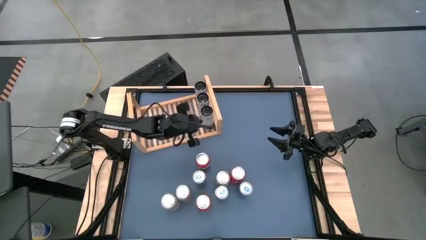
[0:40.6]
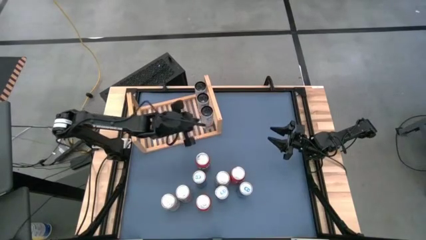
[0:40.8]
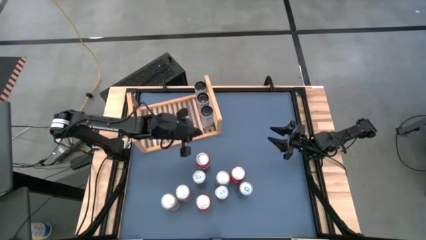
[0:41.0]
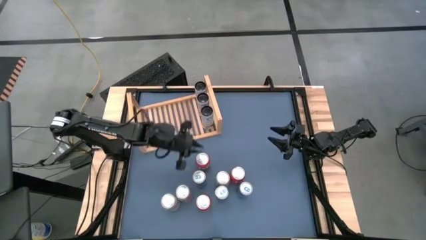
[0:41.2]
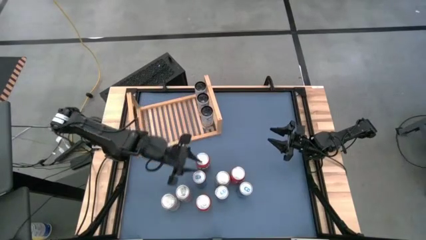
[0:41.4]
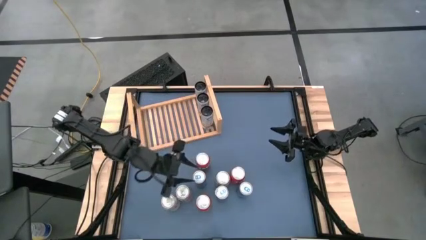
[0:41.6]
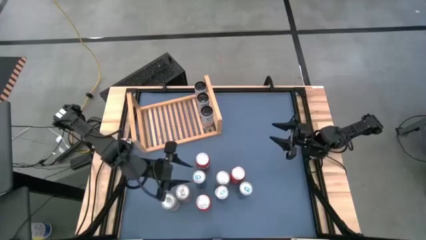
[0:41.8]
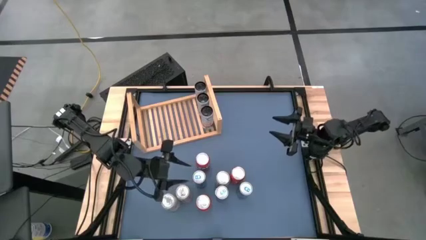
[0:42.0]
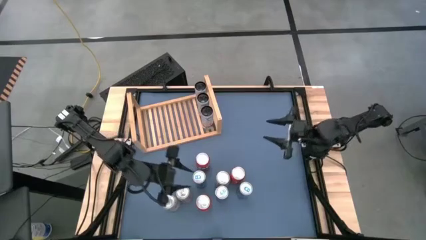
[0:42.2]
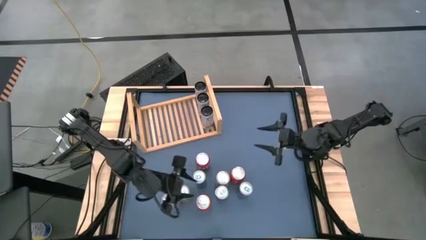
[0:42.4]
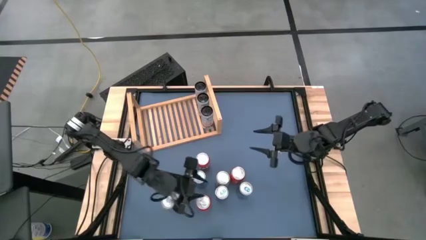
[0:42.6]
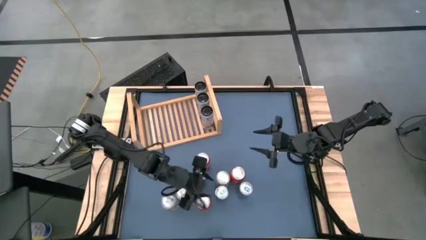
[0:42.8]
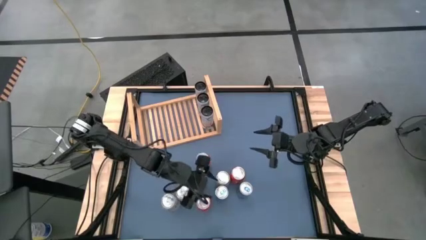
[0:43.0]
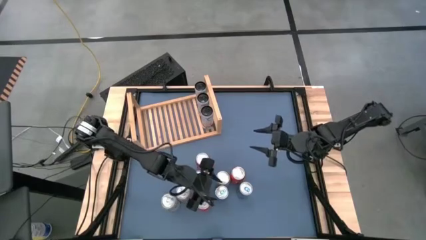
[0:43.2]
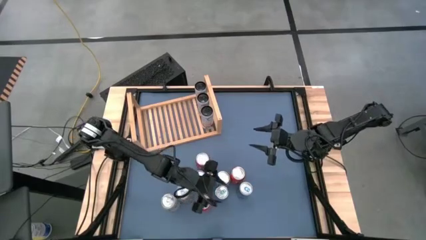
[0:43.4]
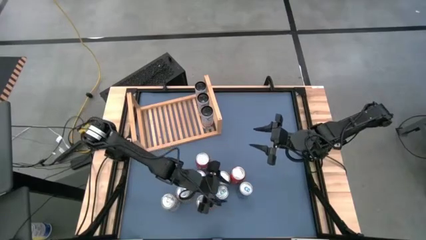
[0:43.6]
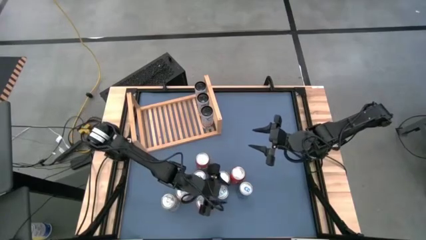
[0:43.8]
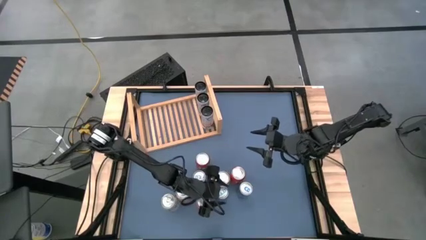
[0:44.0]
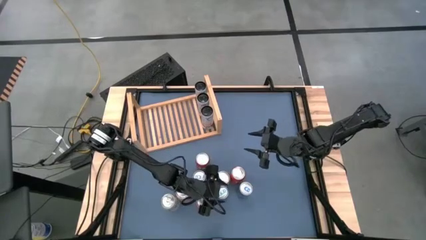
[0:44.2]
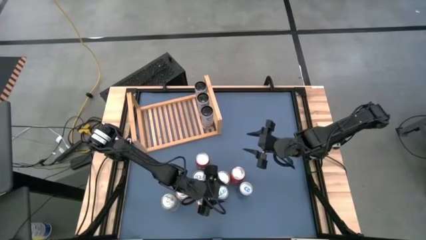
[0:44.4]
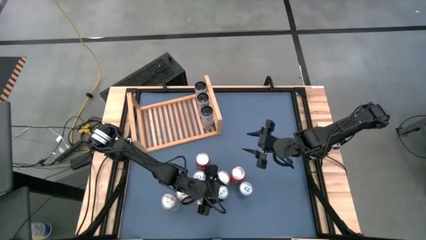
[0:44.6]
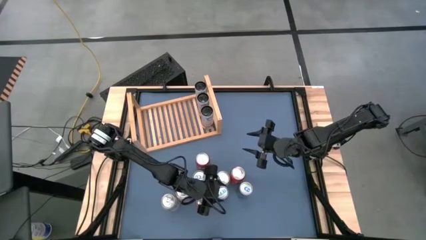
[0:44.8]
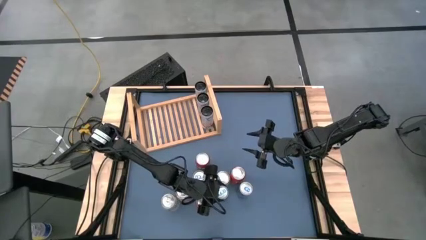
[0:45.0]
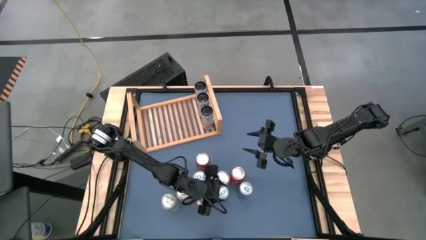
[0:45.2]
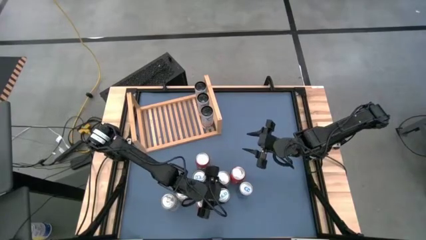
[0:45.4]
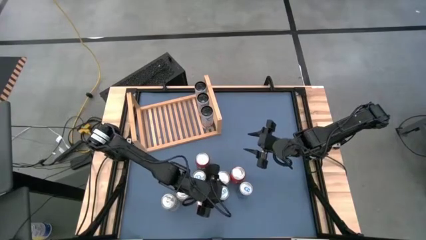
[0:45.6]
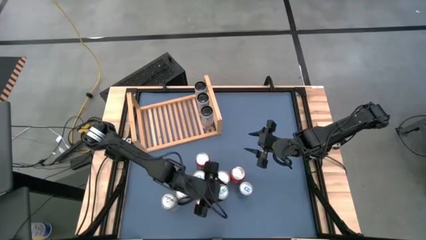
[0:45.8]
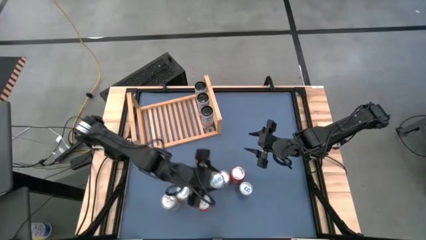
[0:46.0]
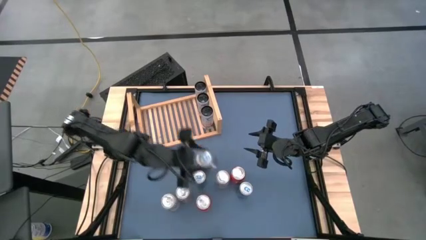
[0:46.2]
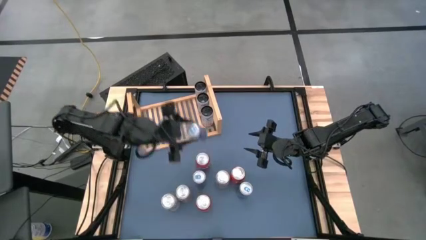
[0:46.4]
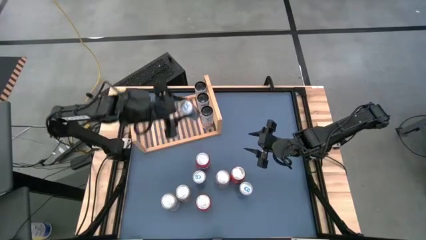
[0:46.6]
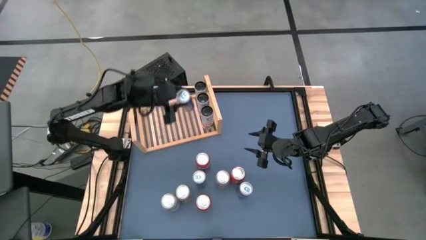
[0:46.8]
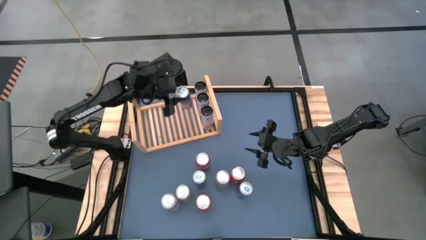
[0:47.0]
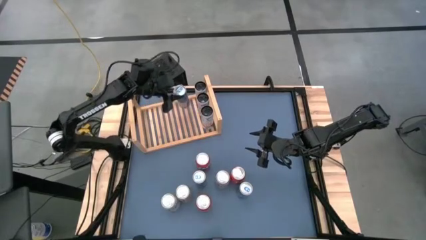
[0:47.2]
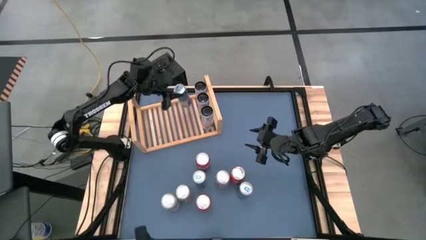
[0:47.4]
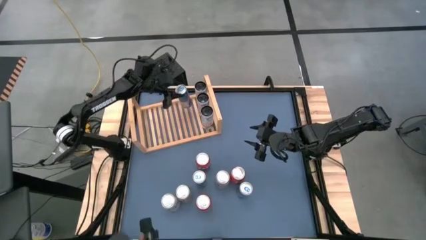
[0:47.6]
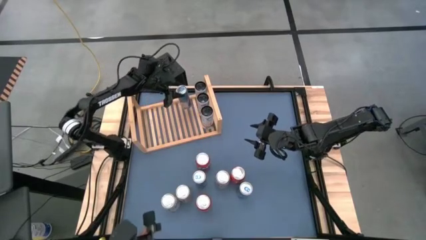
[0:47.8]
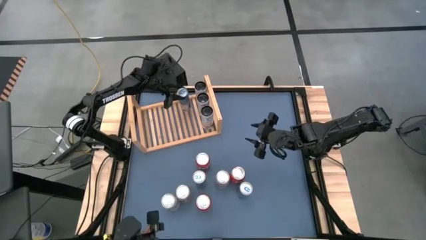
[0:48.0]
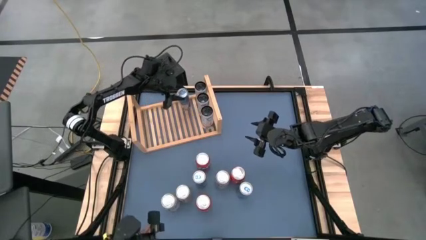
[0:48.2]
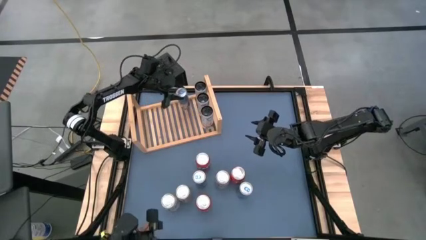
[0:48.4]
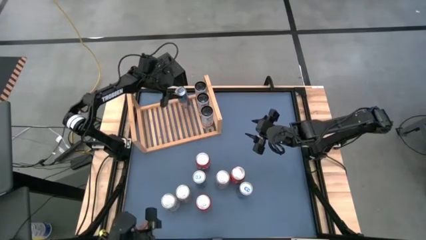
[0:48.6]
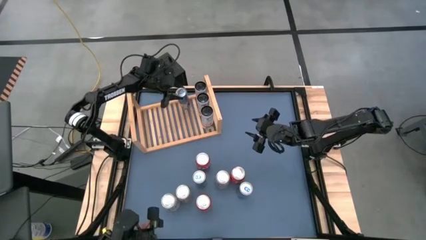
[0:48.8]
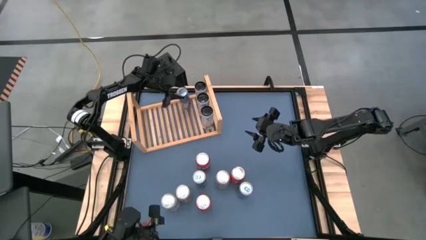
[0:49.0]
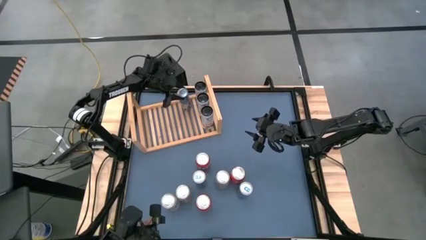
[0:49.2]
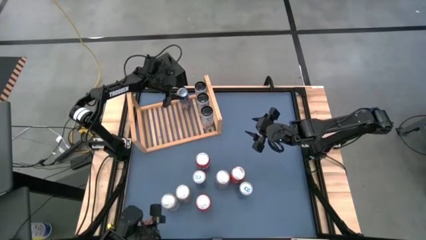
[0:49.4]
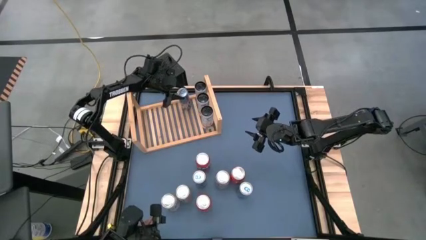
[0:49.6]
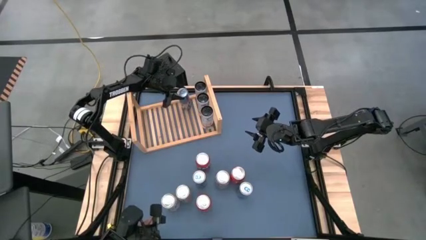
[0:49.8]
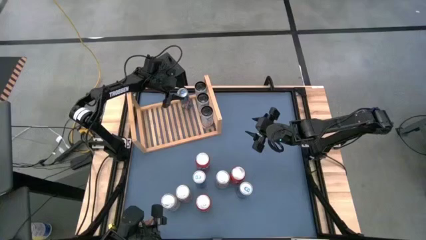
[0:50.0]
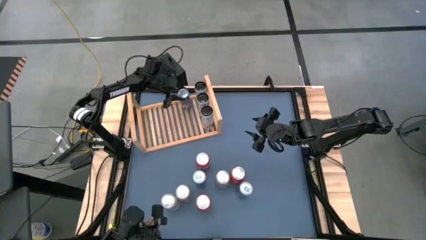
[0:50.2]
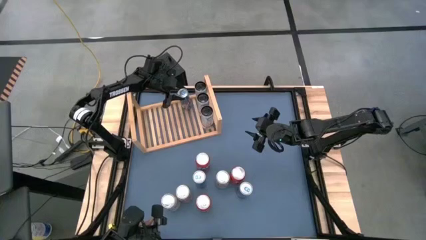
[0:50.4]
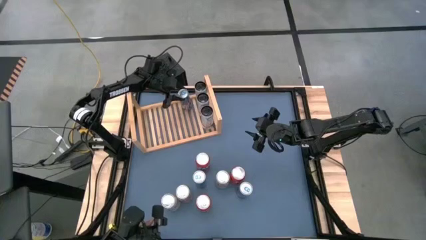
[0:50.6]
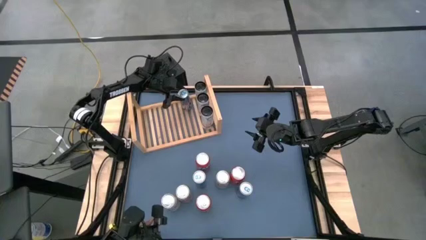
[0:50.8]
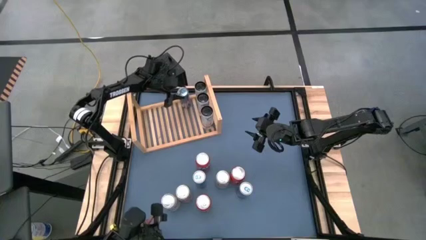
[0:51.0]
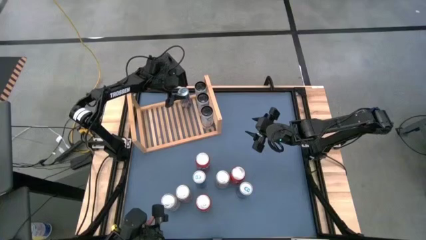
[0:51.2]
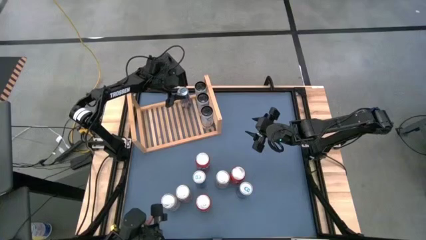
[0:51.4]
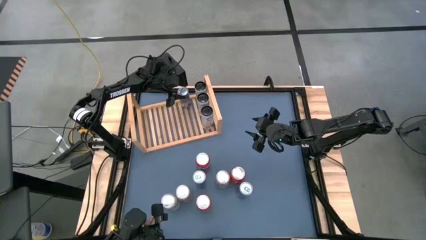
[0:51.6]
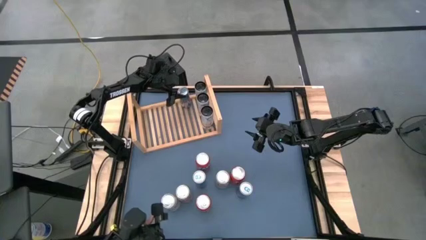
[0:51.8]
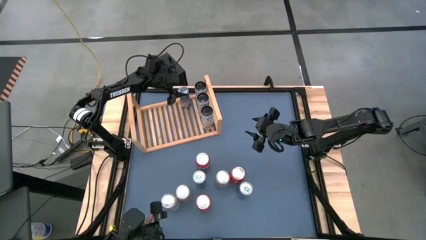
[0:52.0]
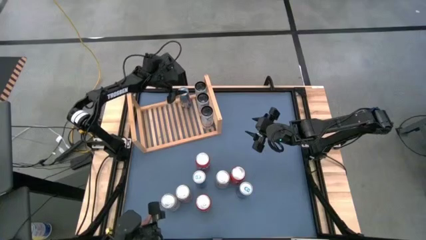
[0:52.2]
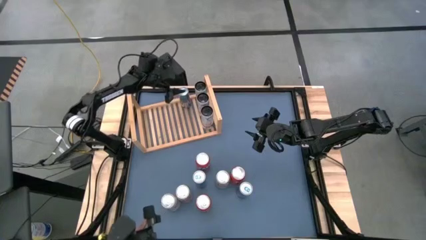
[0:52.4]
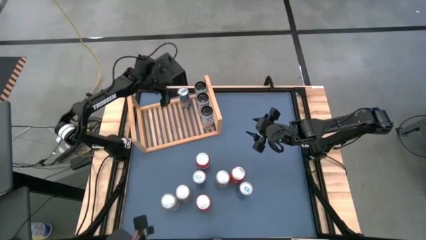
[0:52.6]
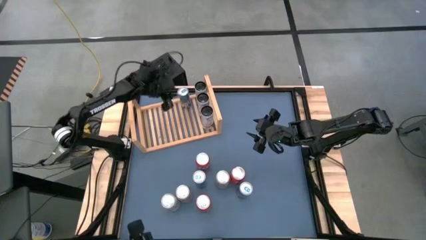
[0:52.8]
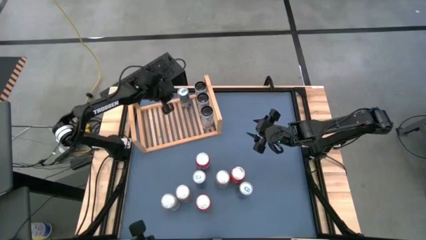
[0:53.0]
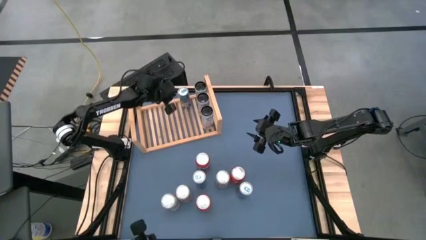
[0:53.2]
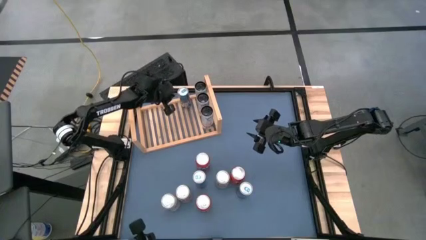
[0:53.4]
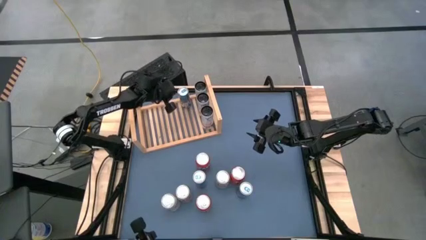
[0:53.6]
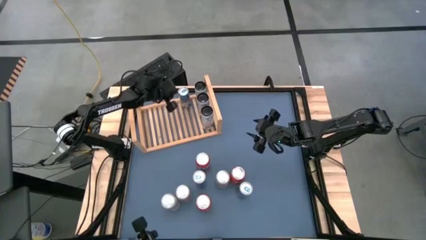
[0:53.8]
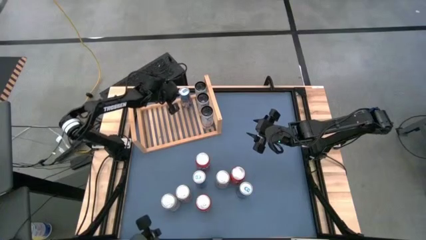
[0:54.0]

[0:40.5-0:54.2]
Task: Place canned beverage on shelf
Put the middle blue soda can on the shelf

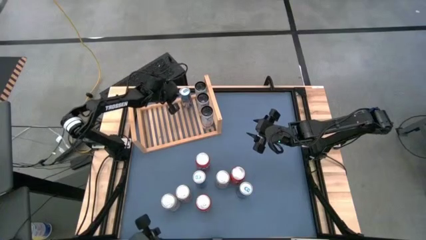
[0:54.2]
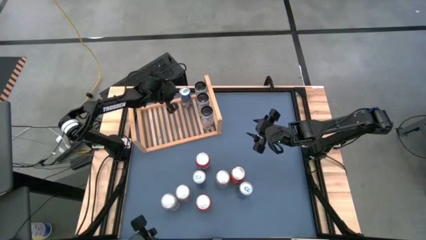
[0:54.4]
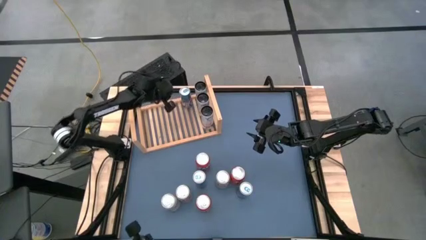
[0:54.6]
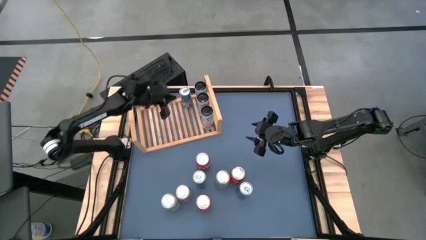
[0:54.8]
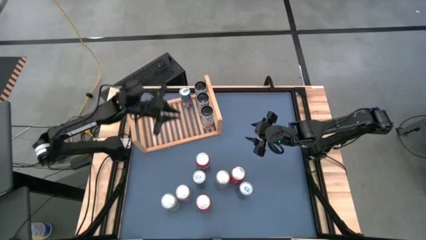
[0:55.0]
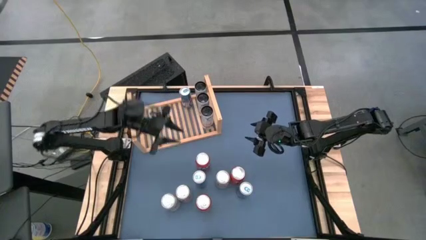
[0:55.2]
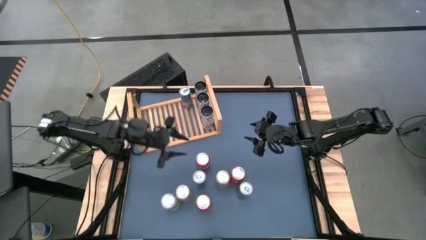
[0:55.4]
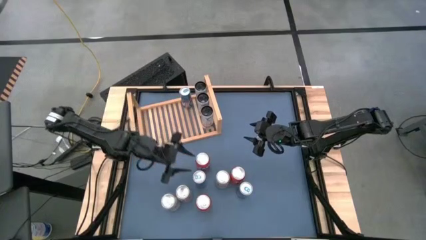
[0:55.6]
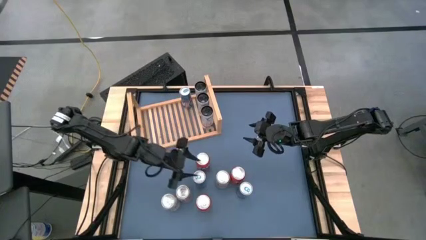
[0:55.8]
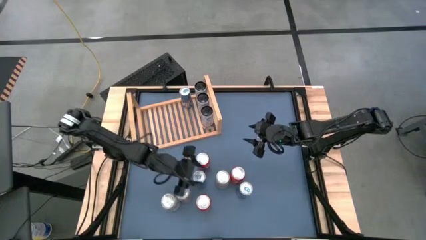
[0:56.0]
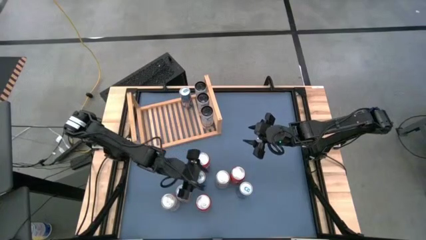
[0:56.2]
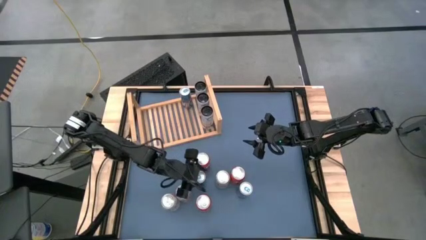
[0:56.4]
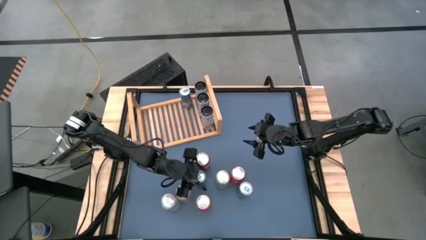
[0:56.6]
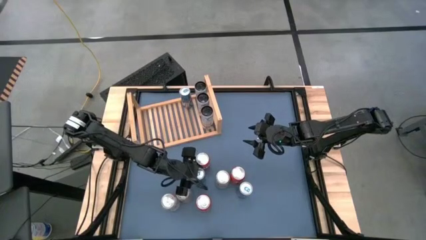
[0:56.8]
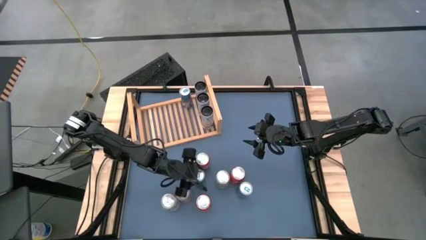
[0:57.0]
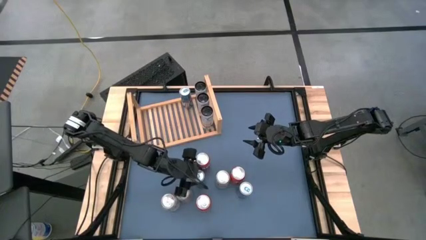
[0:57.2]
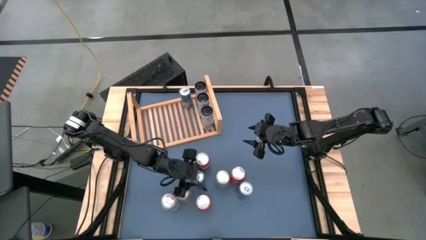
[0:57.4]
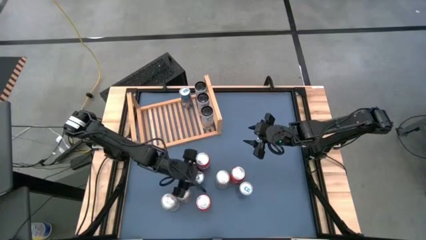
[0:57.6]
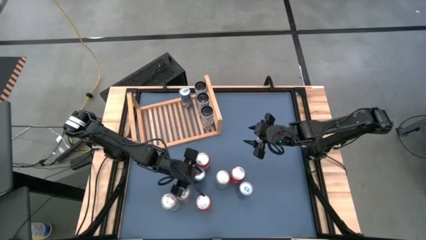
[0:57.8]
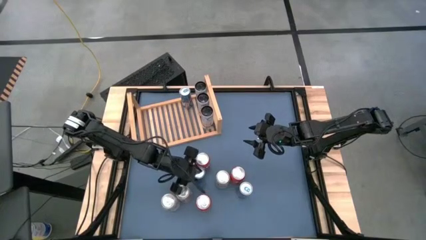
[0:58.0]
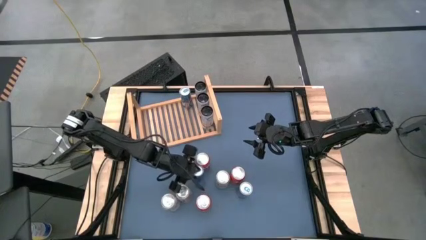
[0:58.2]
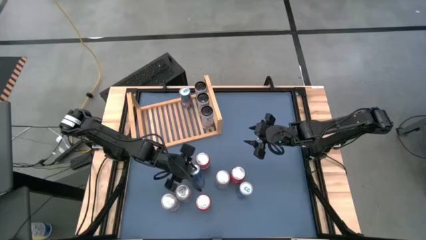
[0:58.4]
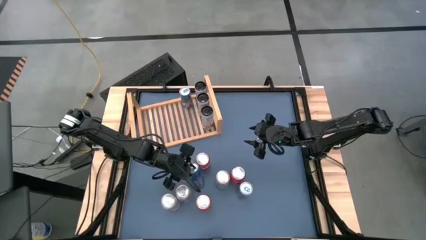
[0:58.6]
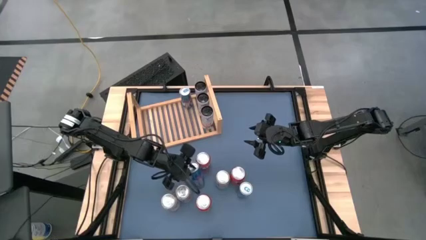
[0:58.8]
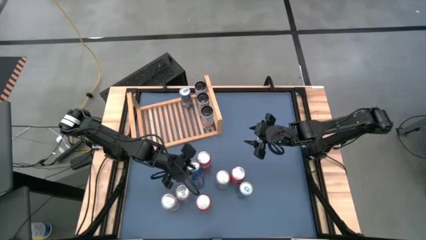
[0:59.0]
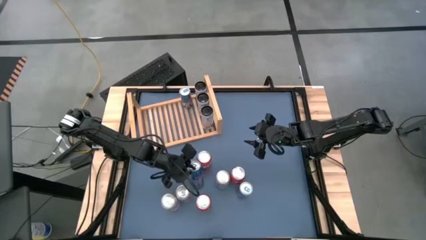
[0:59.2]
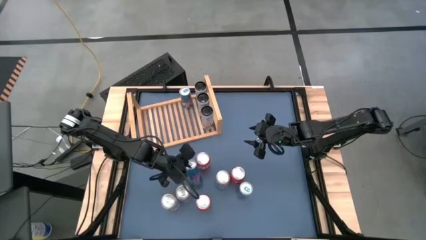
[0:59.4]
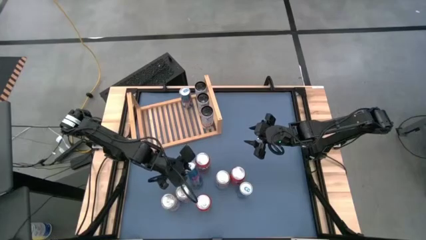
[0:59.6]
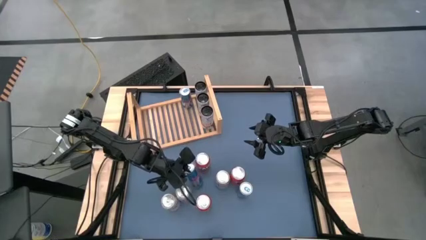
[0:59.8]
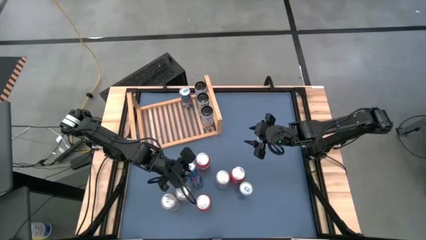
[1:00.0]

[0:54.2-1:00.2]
Put the left blue soda can on the shelf aligned with the other blue soda can
